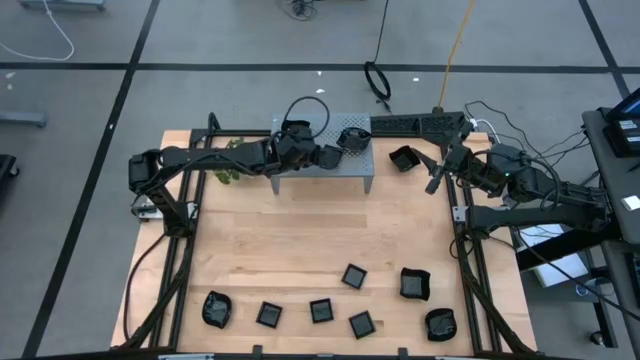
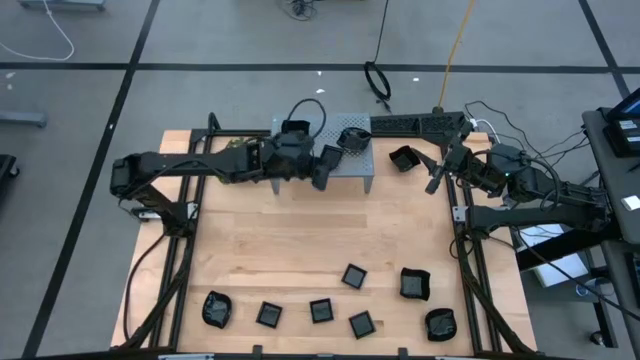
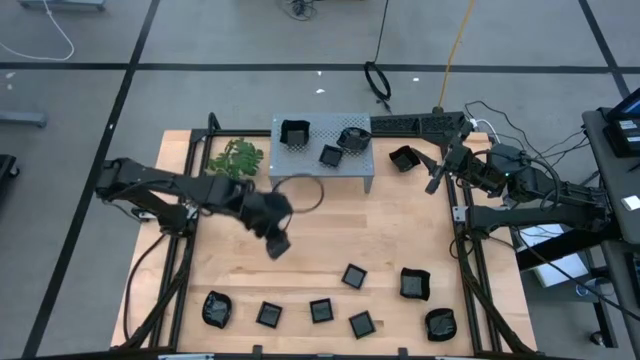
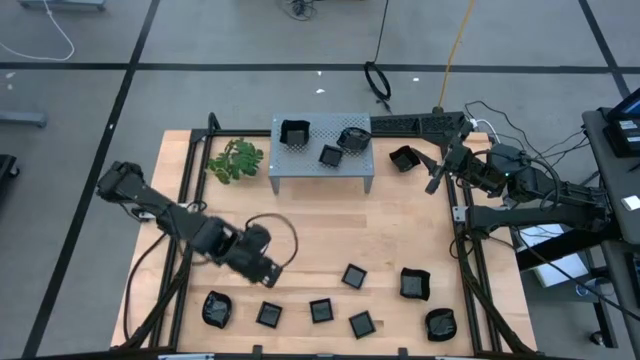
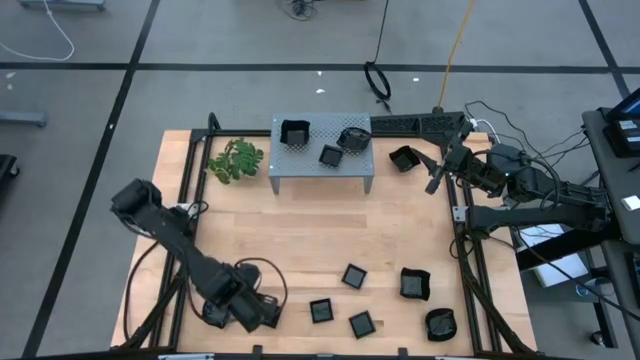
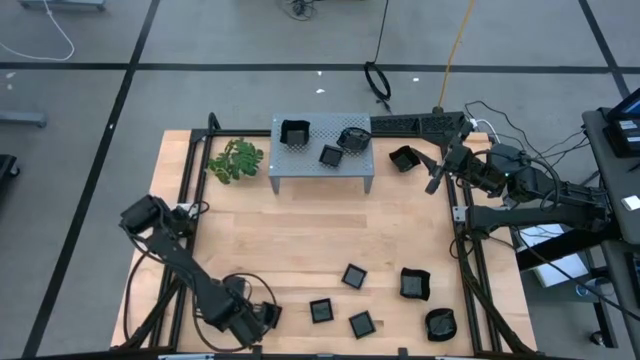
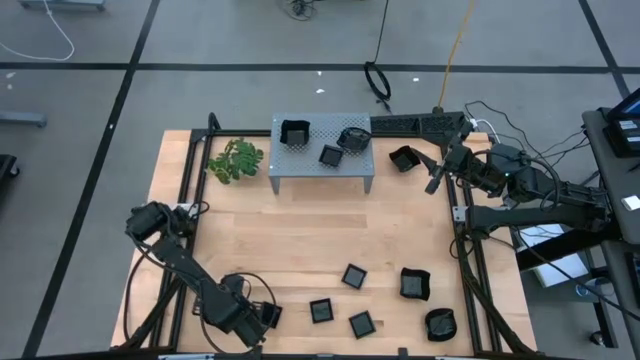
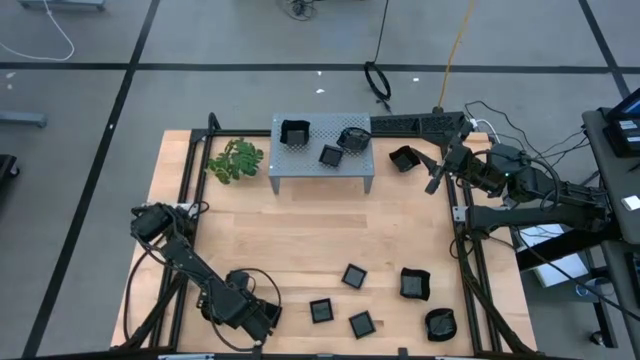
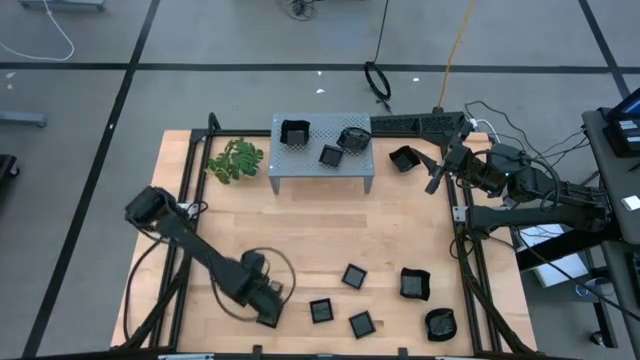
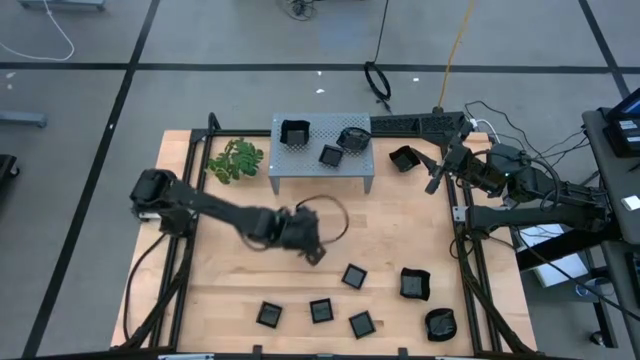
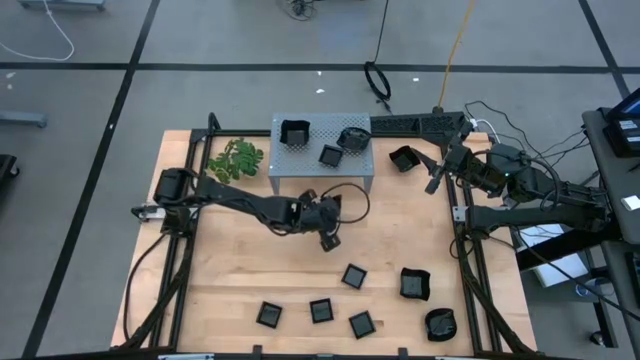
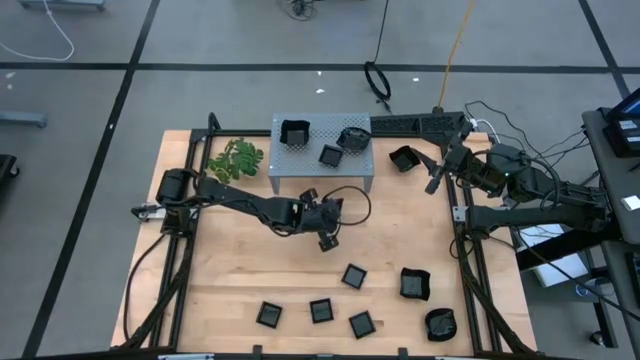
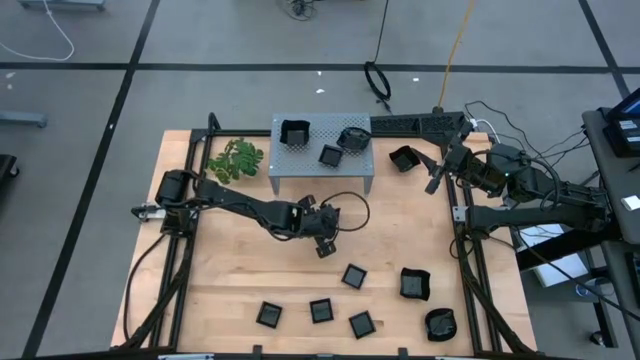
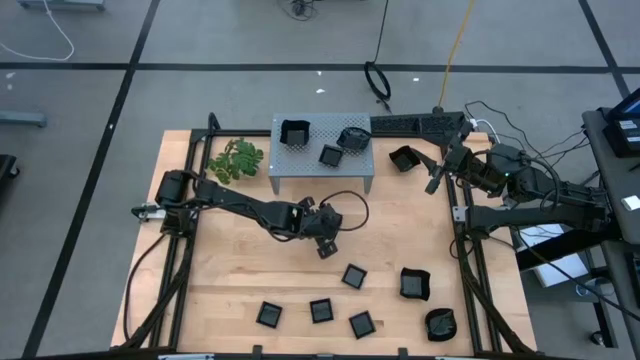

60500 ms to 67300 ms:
Task: Pick & Place Mini shaped plates
Move the black leaf-shaped plate to the center of the table

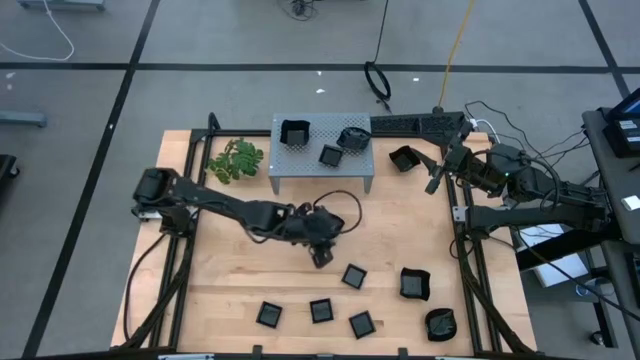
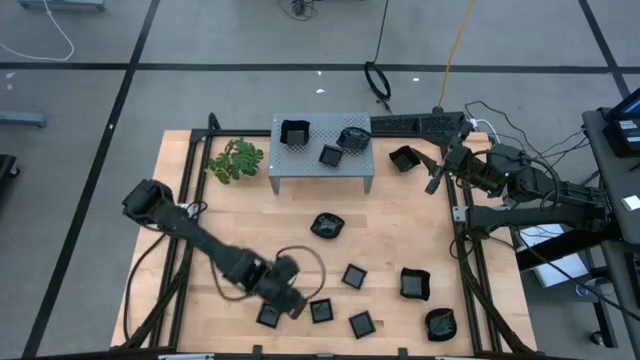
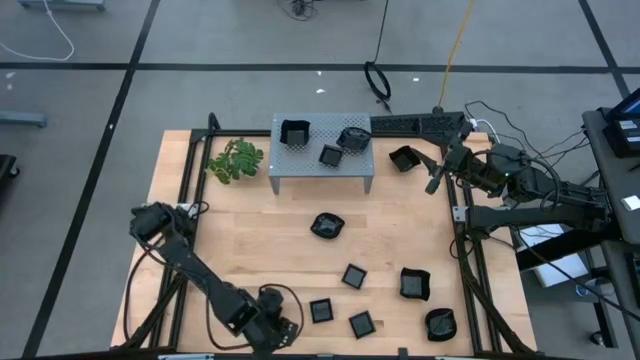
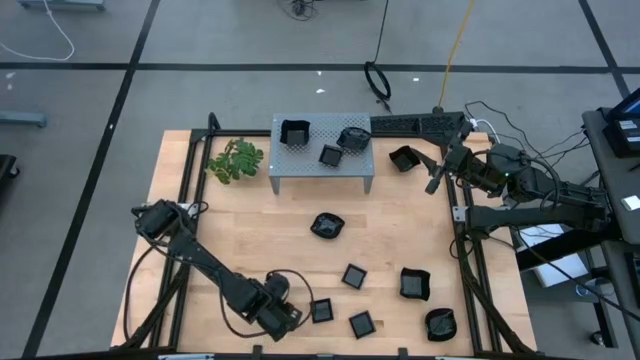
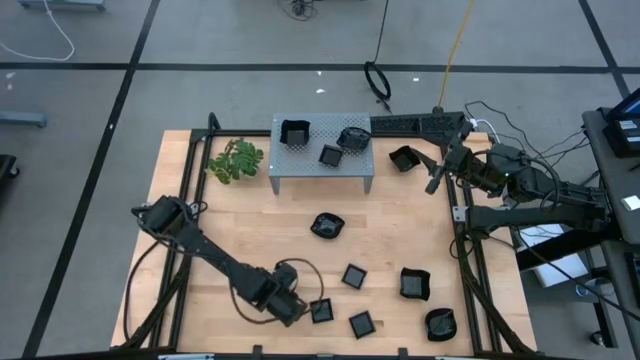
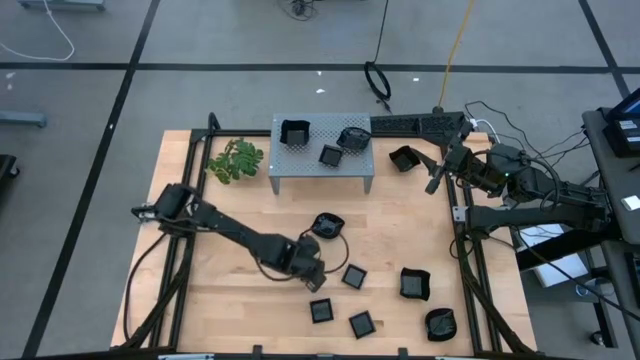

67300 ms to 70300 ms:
Stack the black square plate on top of the black square plate on the shelf

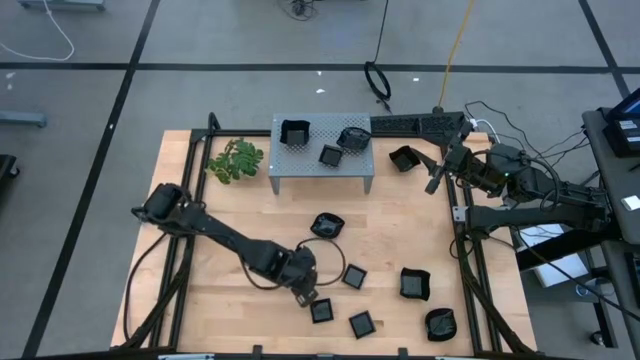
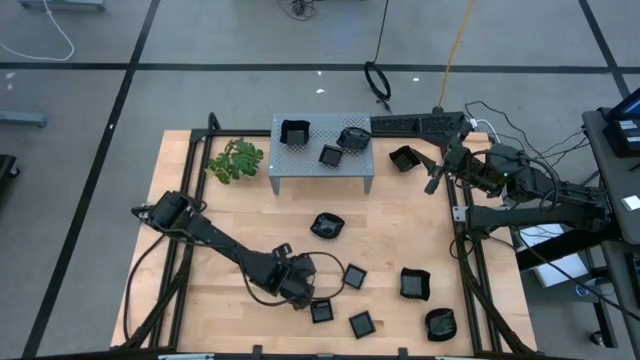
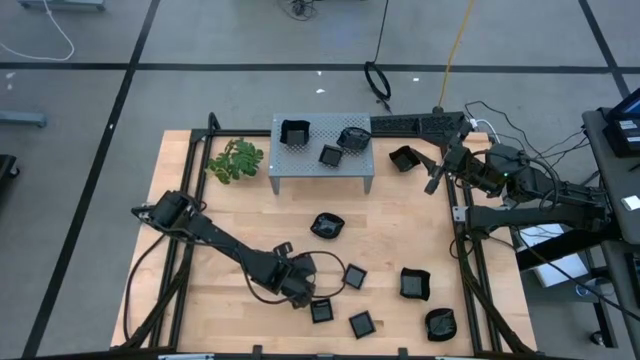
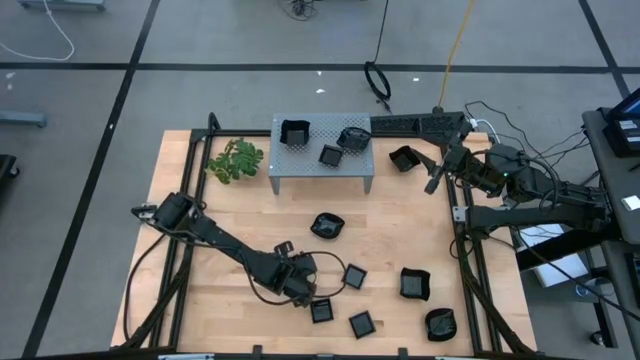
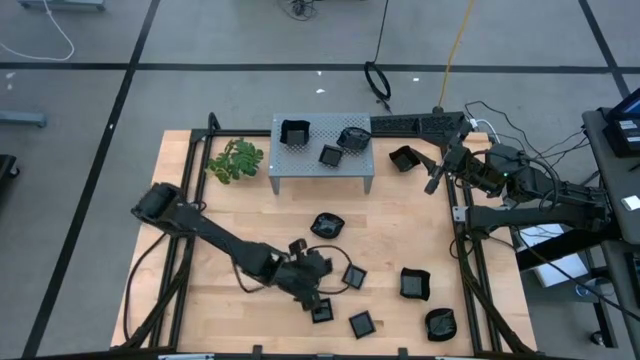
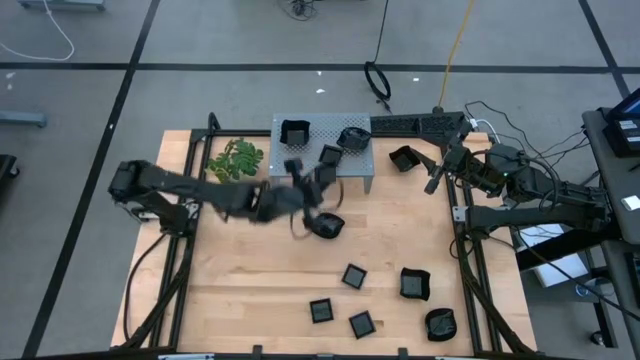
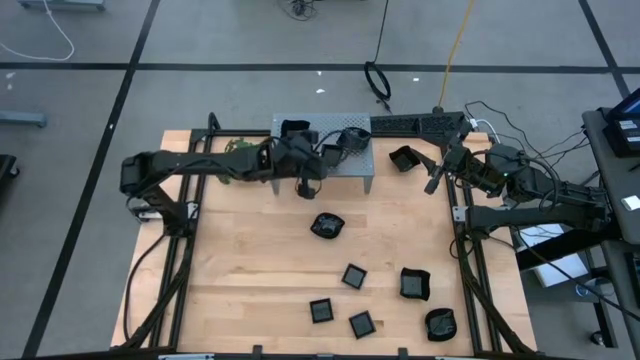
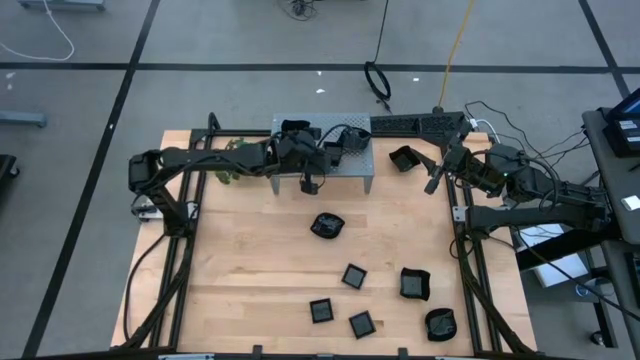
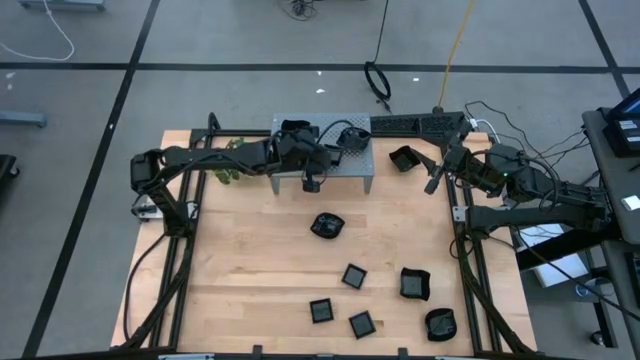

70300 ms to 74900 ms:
Stack the black square plate on top of the black square plate on the shelf

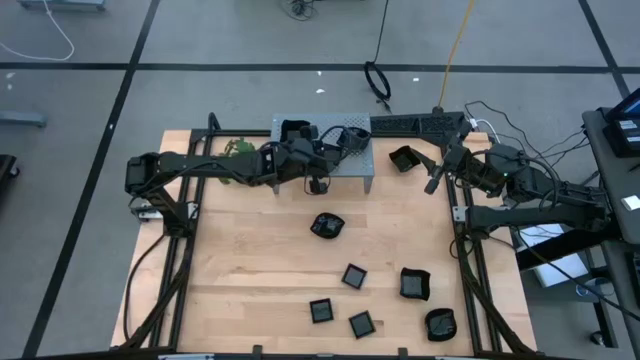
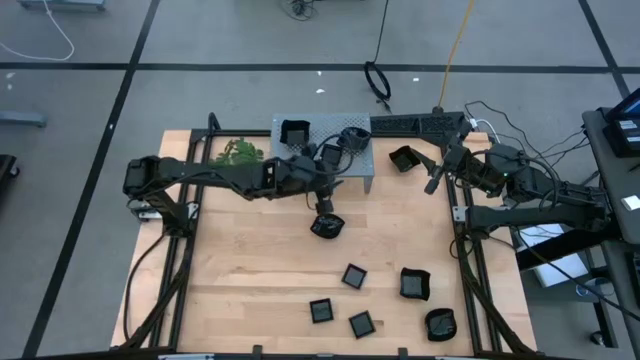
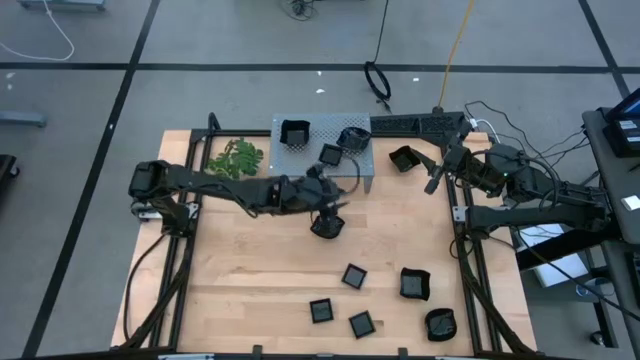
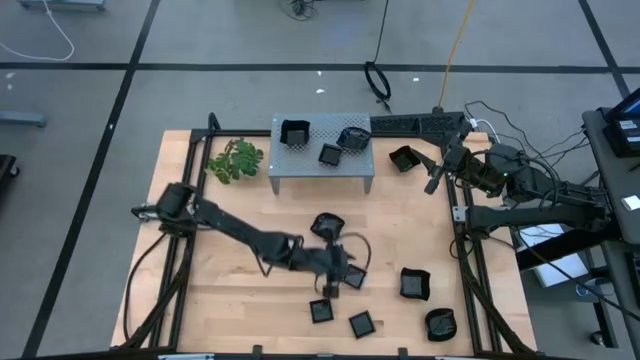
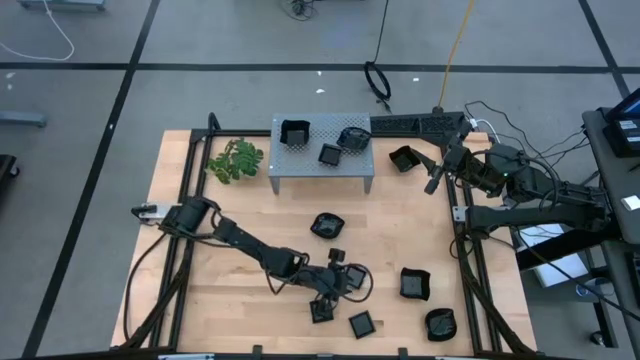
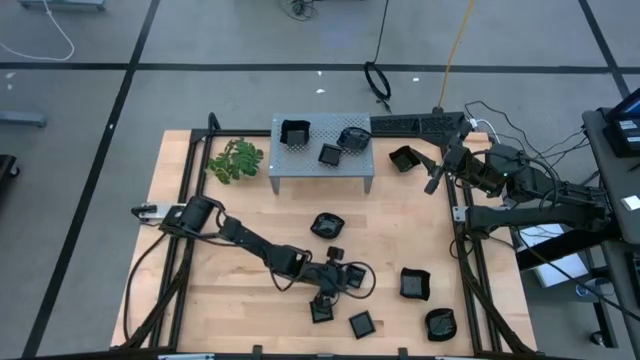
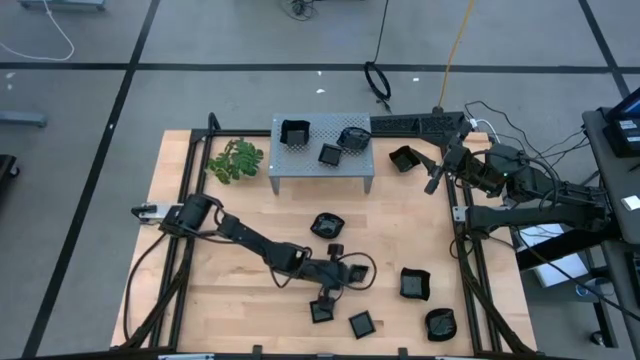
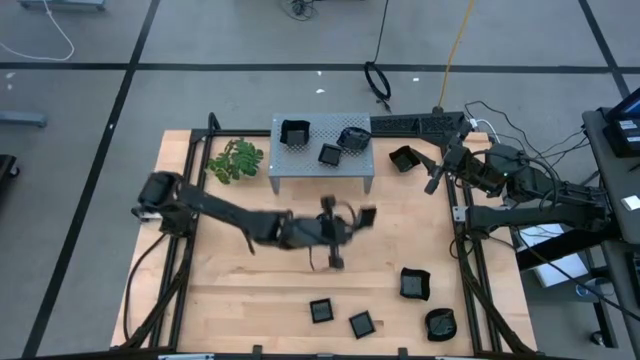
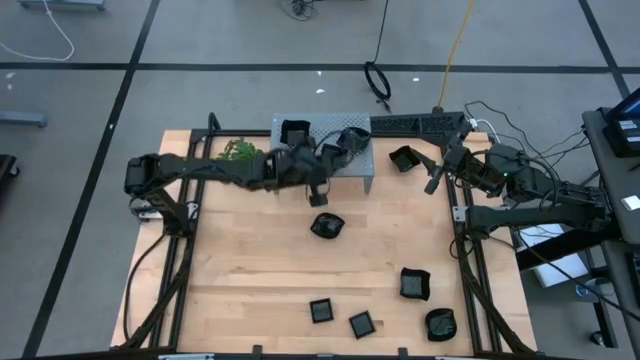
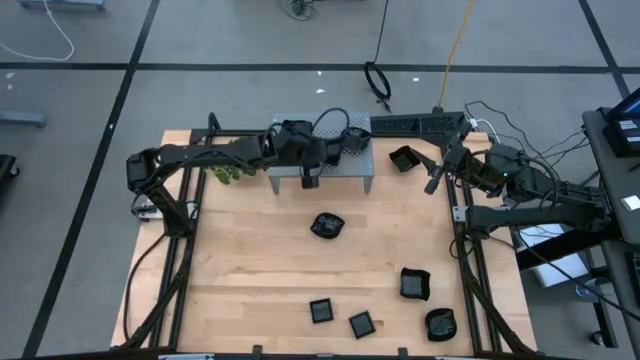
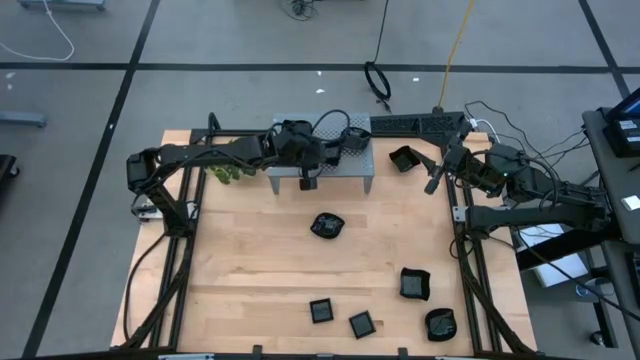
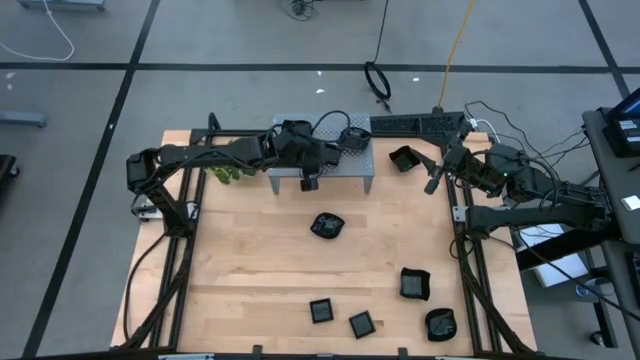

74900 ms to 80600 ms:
Stack the black square plate on top of the black square plate on the shelf
